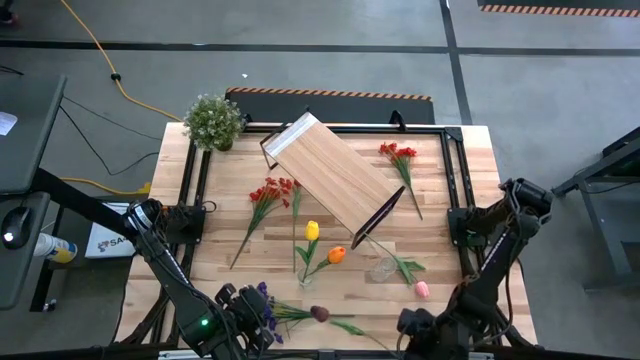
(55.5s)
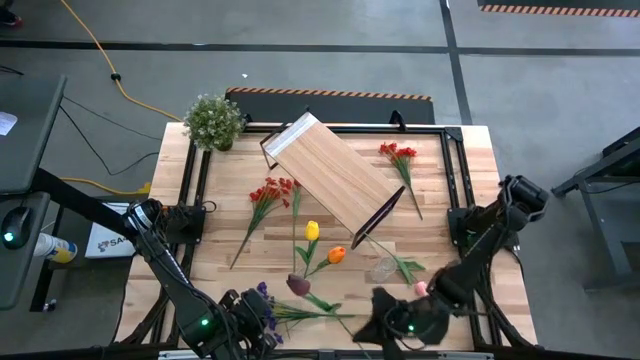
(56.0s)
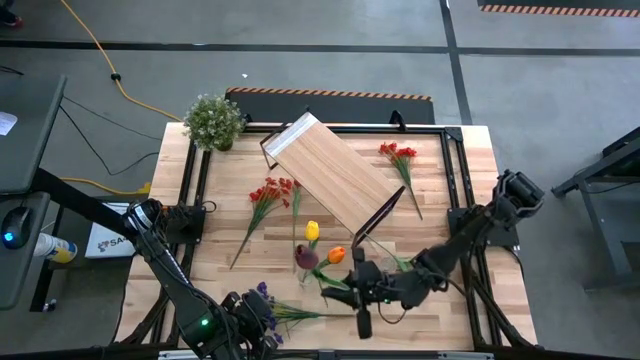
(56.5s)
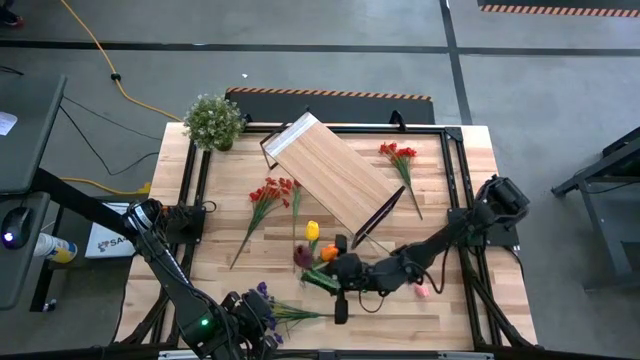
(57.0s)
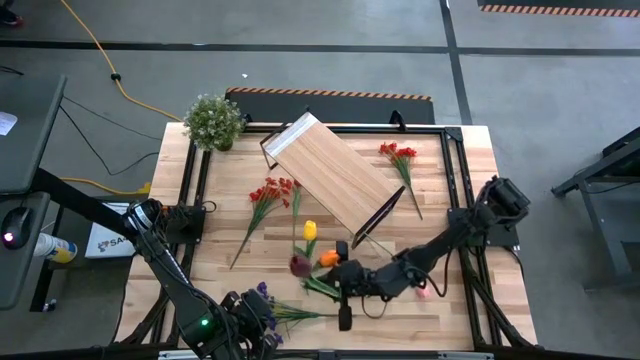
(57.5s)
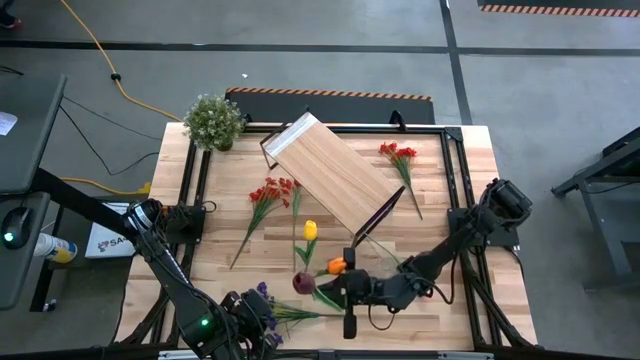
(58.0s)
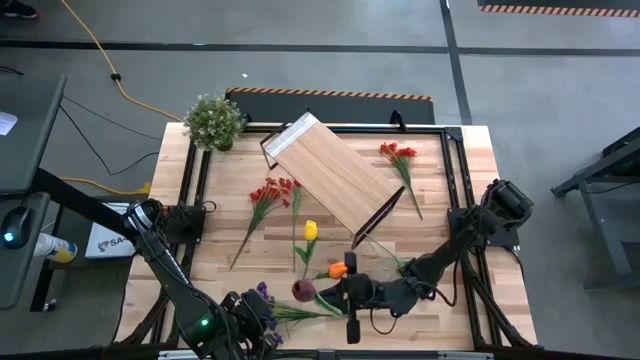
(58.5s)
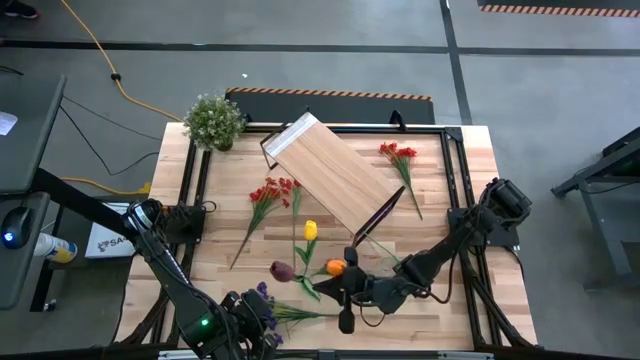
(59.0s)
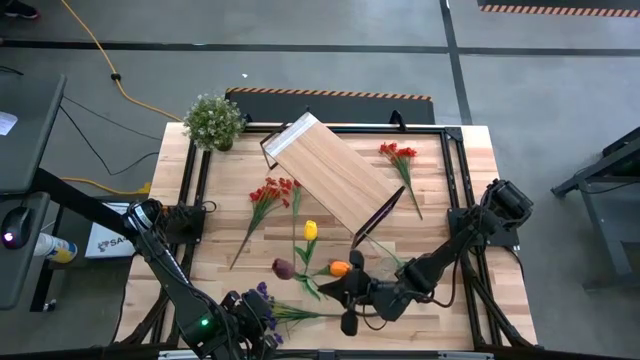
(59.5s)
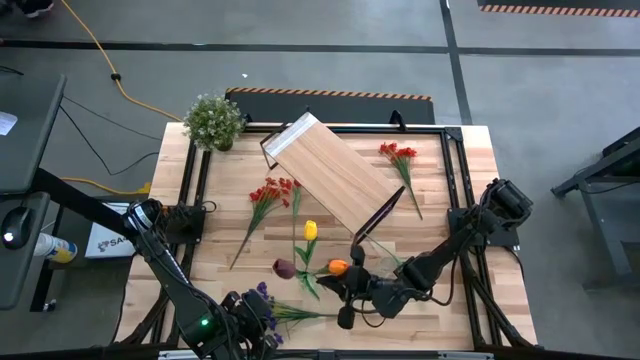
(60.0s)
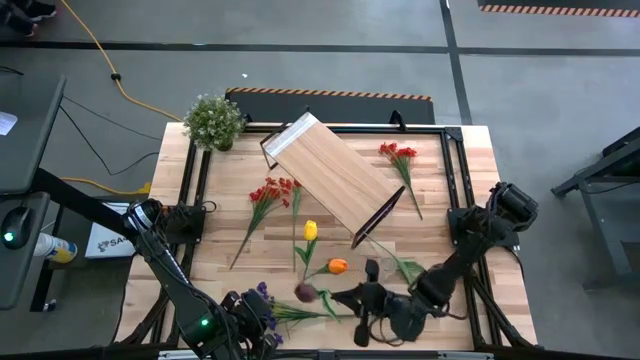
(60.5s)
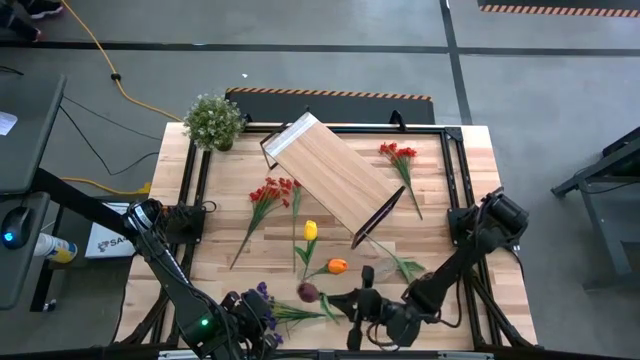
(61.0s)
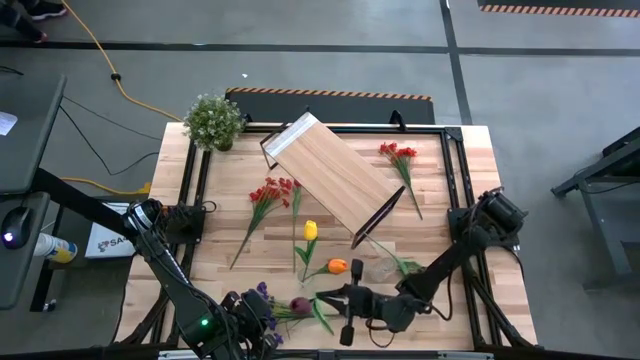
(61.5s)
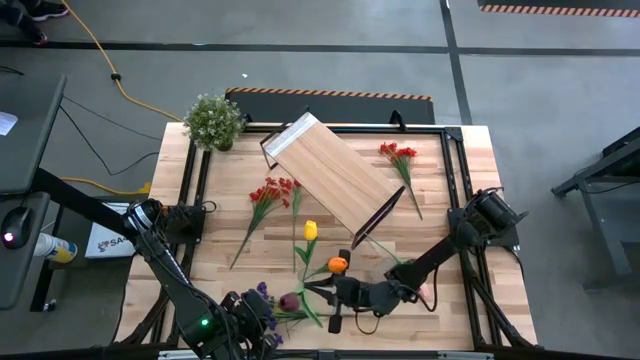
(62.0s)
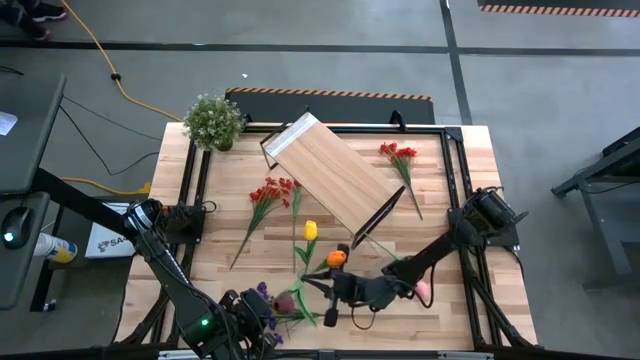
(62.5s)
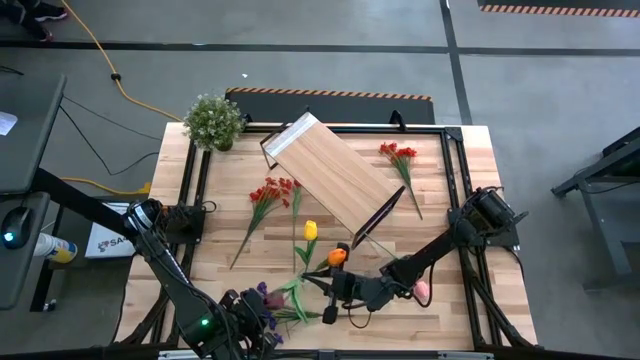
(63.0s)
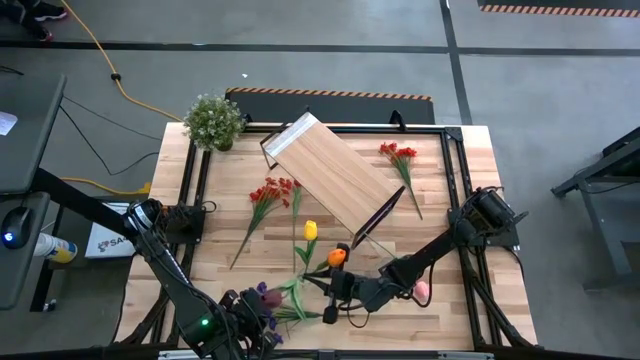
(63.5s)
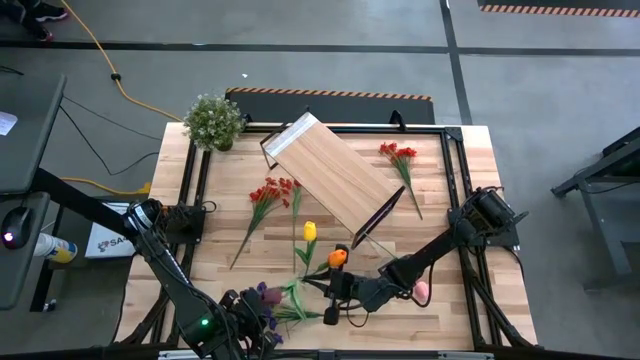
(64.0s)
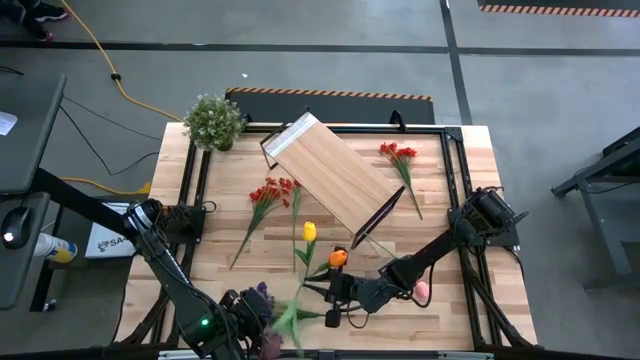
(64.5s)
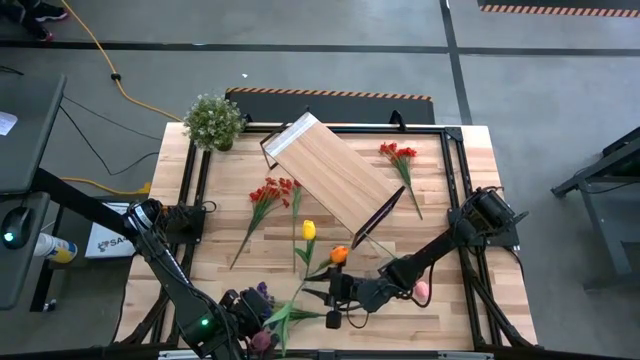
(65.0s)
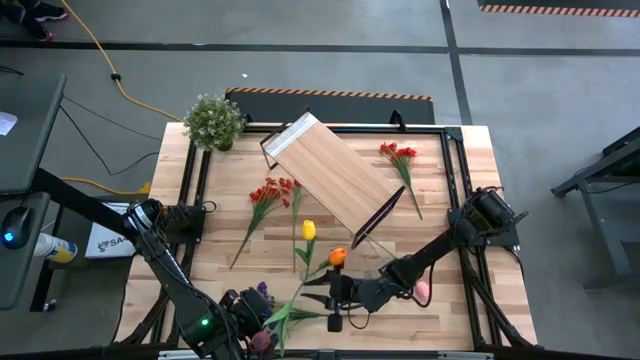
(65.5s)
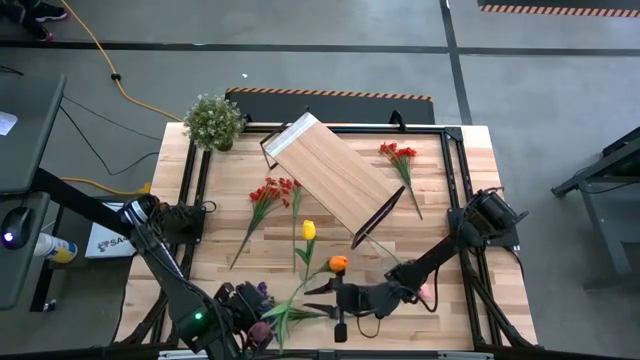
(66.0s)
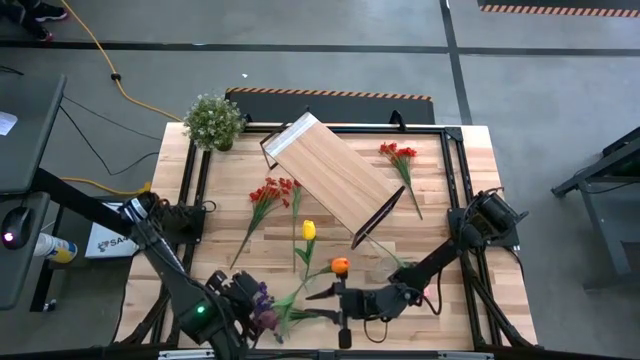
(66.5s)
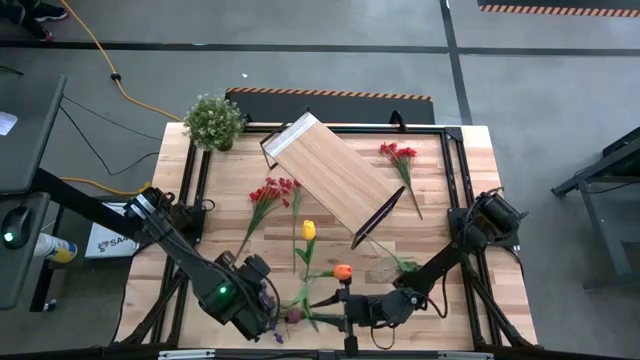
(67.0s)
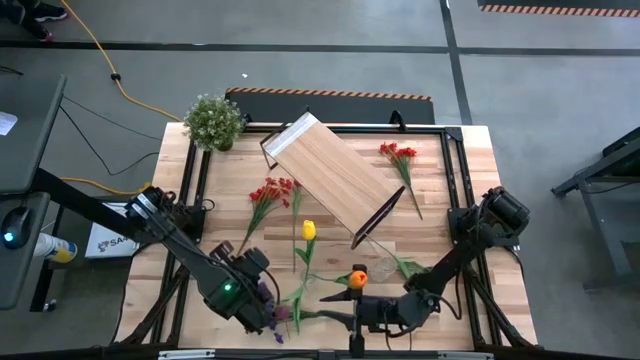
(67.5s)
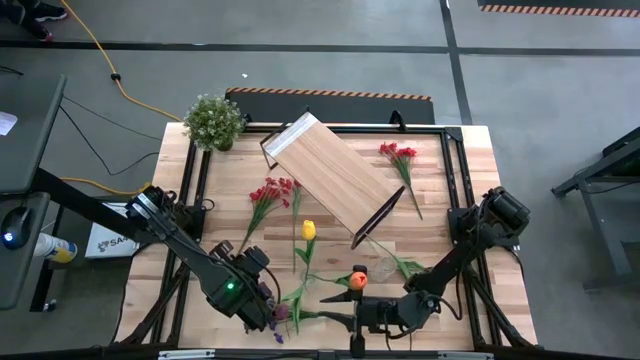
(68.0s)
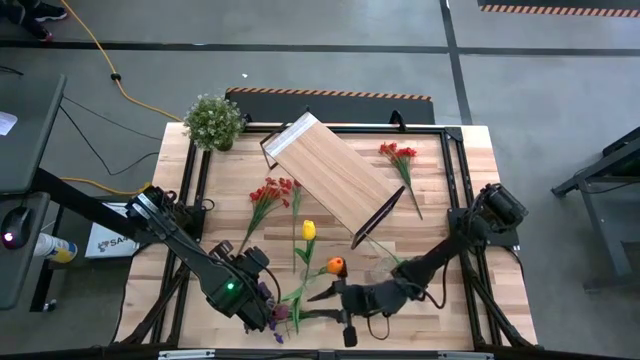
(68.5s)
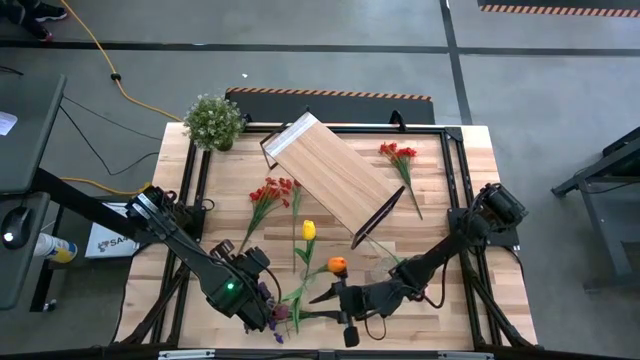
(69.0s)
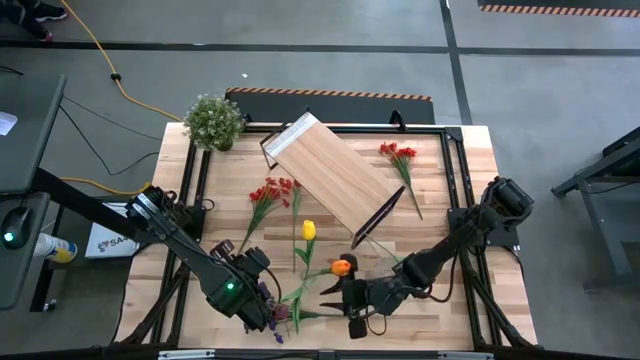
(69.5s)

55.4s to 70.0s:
Task: Pick and place flowers into a vace then onto a shelf
Put the dark red tulip into the left transparent vase

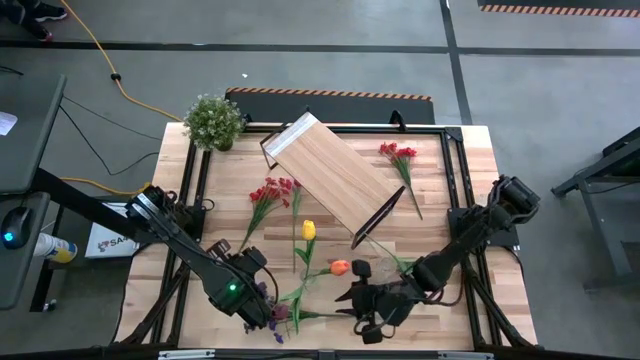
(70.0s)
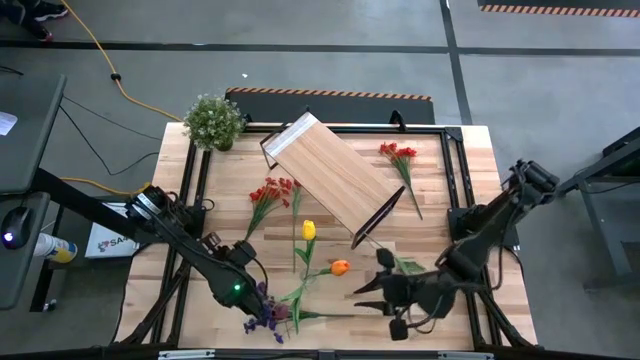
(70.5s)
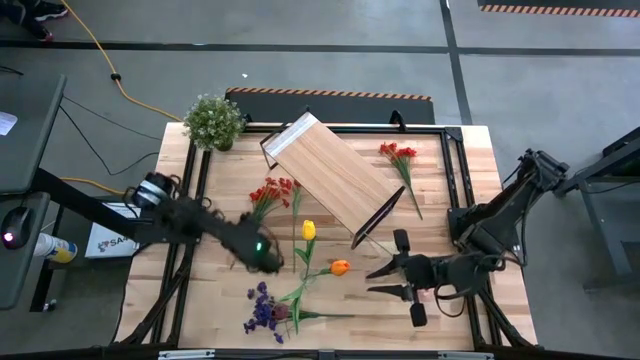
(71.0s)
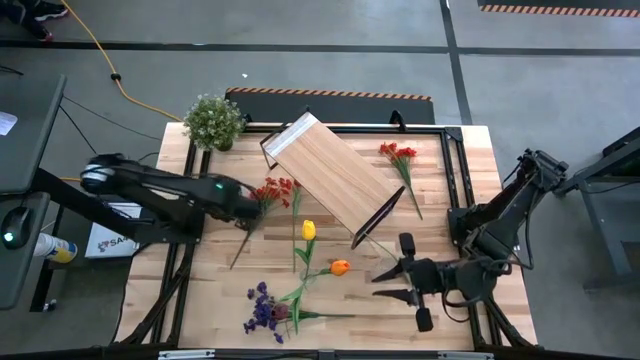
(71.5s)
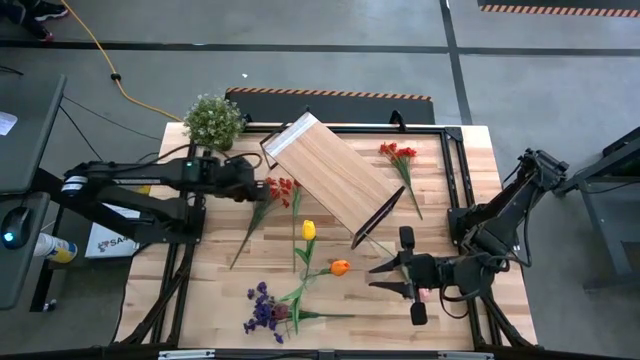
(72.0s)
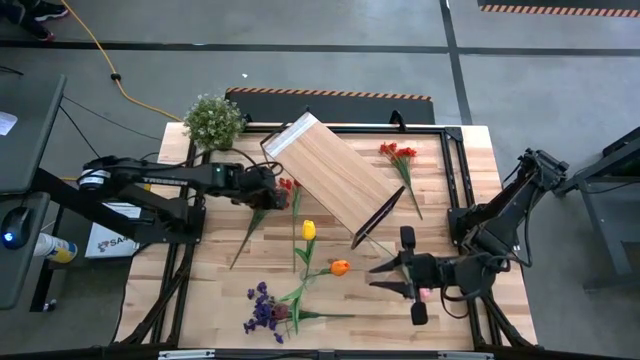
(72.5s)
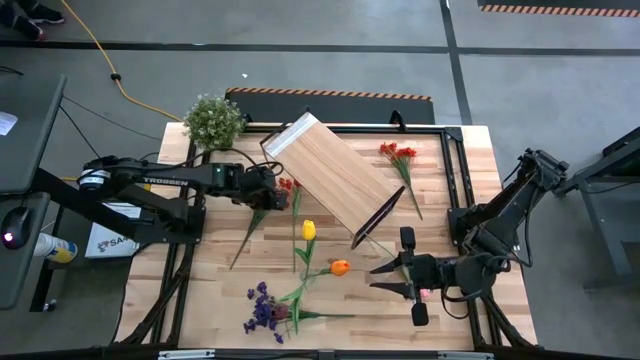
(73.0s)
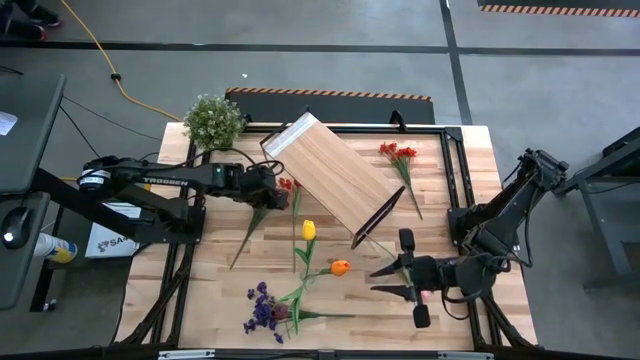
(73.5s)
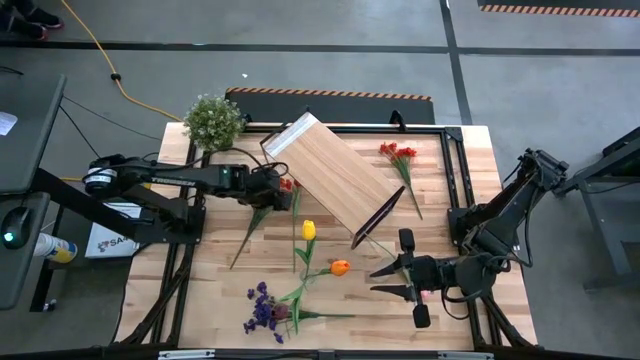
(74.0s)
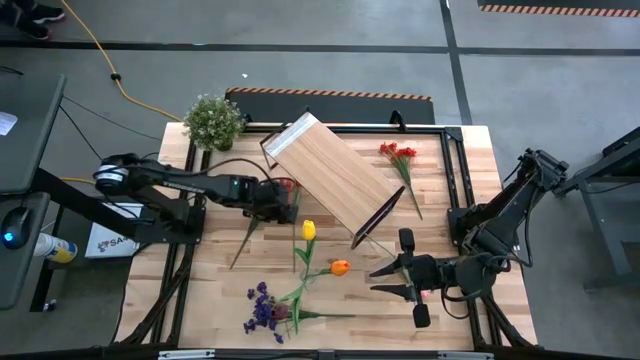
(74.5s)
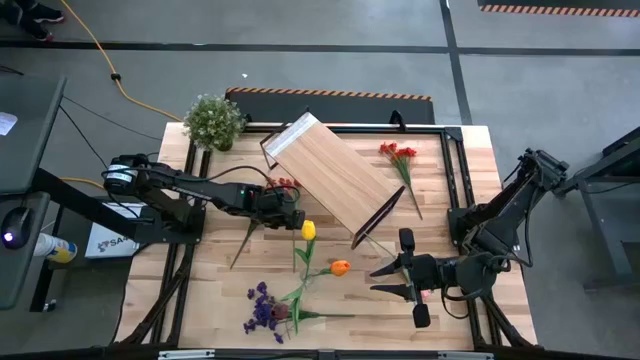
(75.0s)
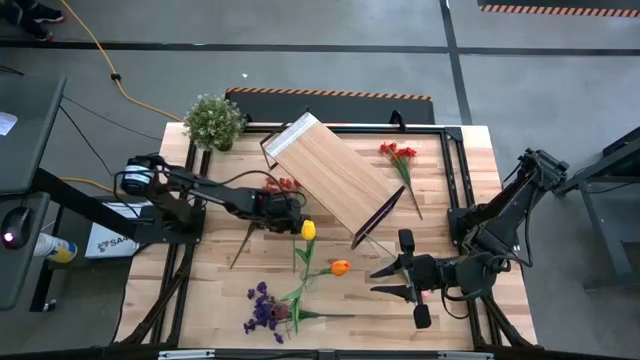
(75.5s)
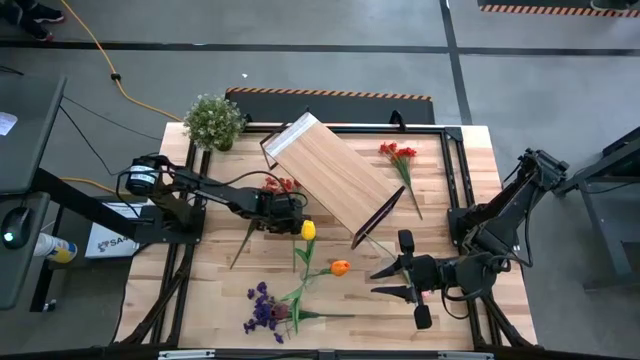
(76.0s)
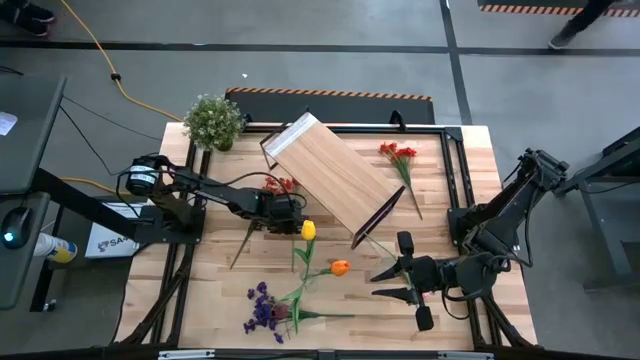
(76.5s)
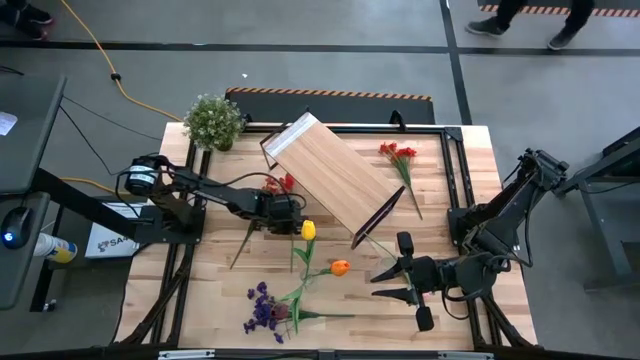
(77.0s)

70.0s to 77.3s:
Put the red tulip into the left transparent vase
